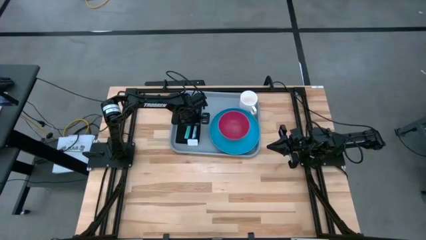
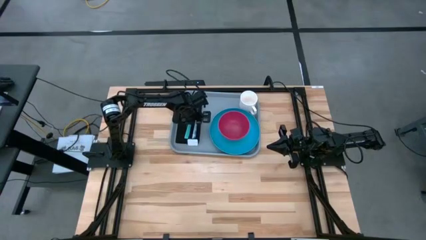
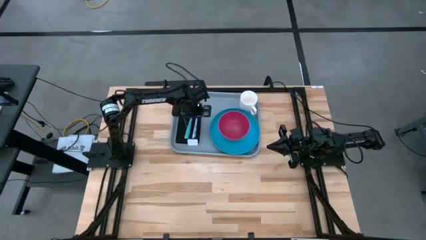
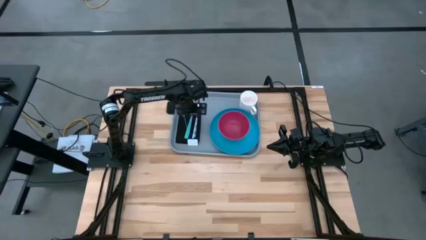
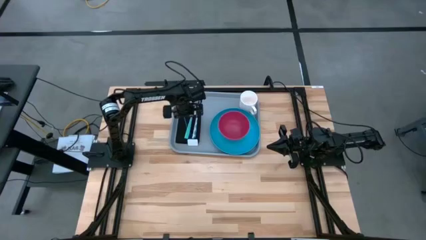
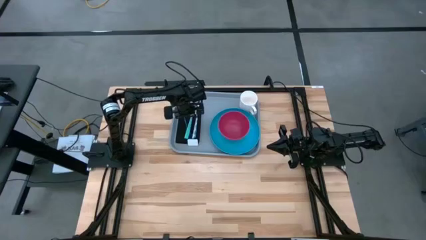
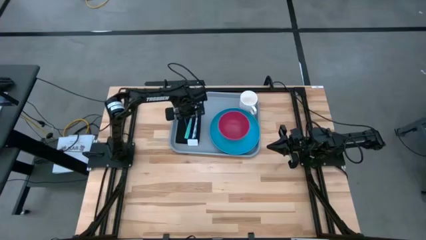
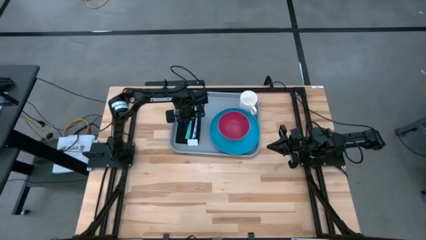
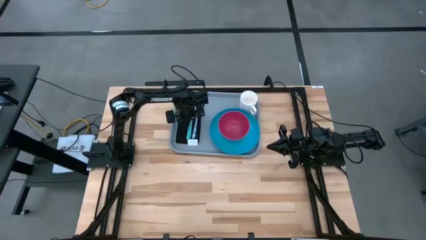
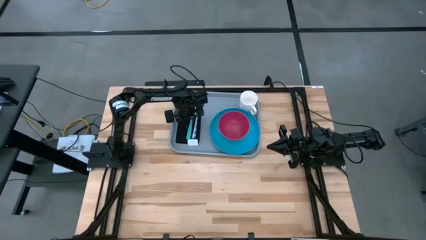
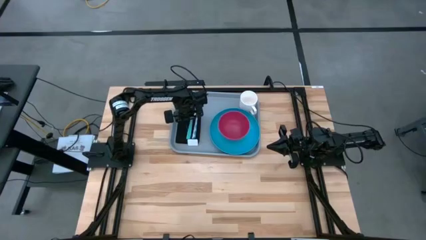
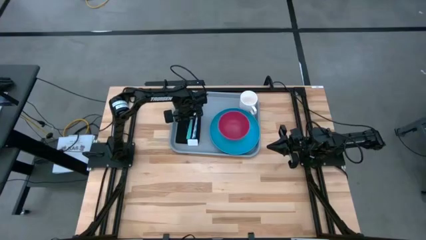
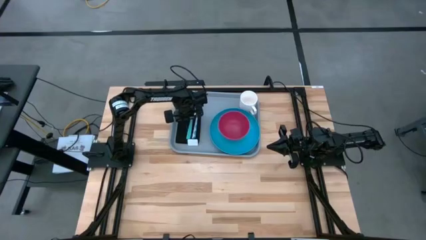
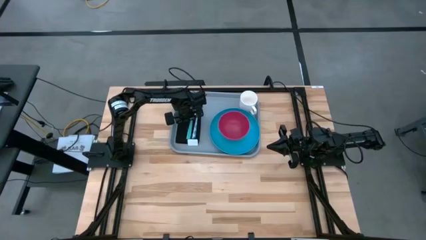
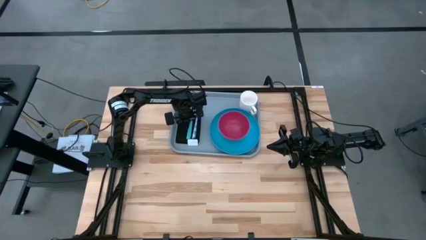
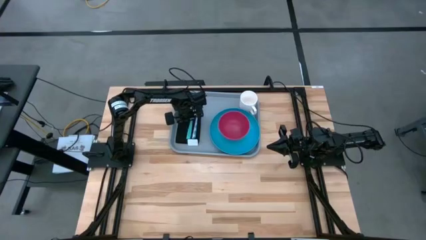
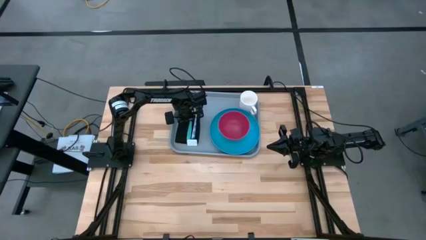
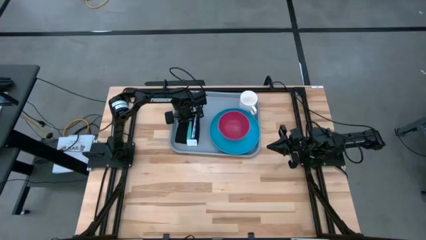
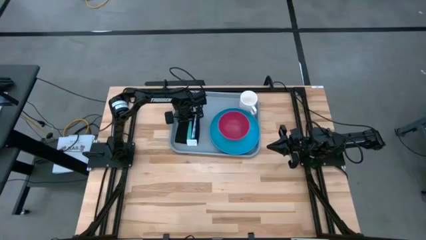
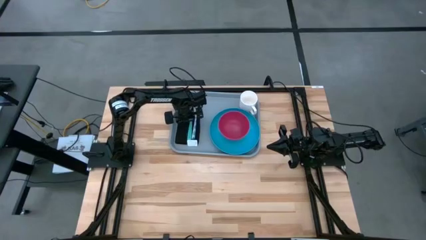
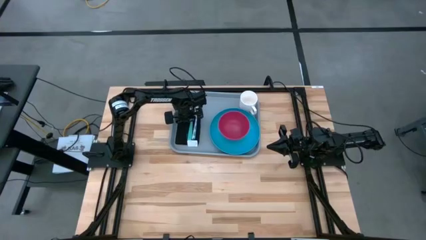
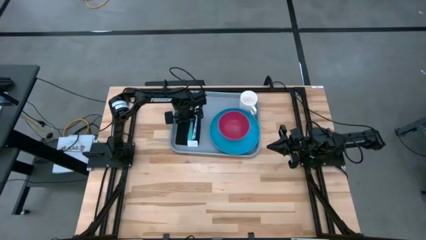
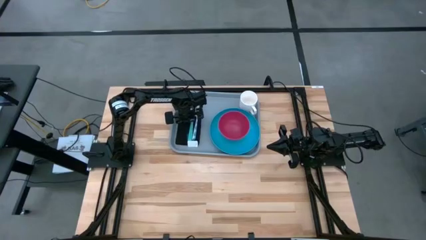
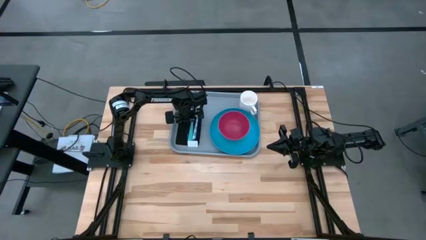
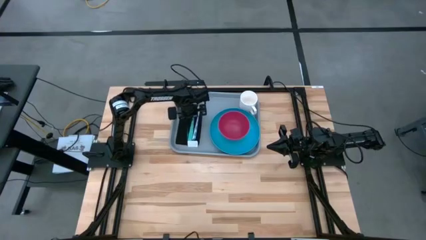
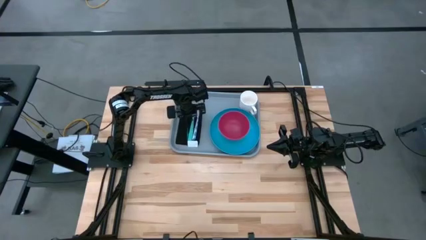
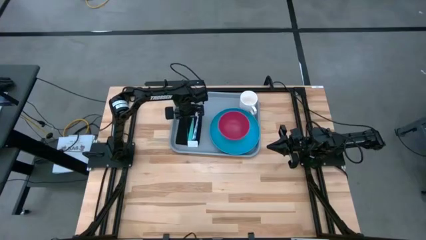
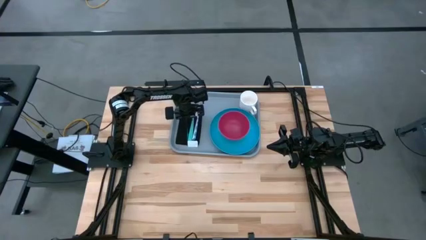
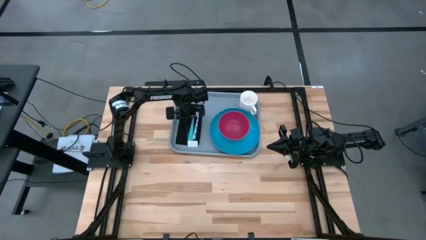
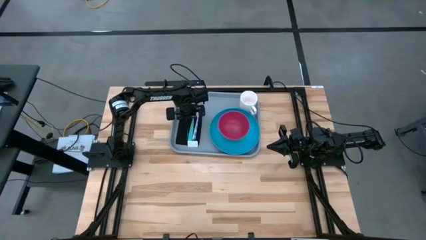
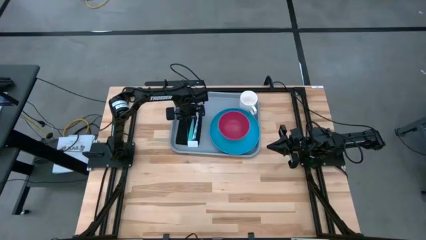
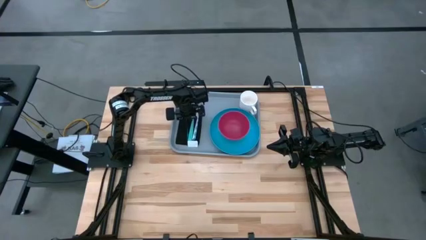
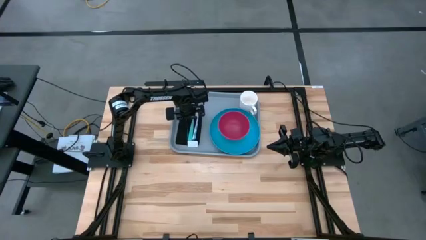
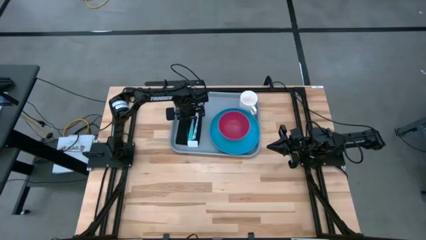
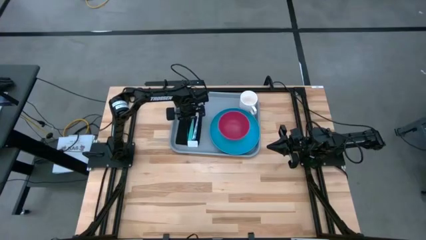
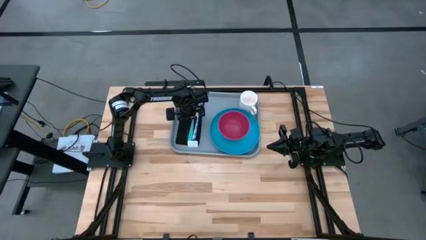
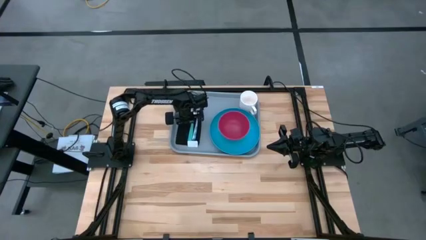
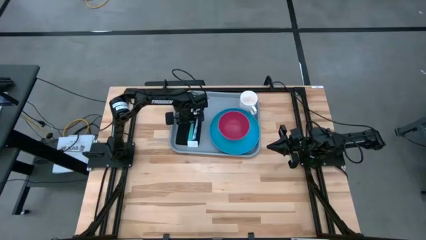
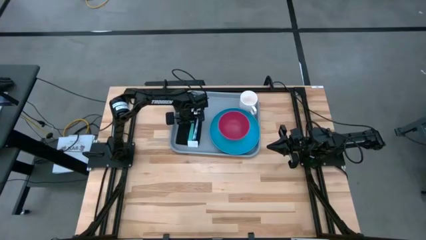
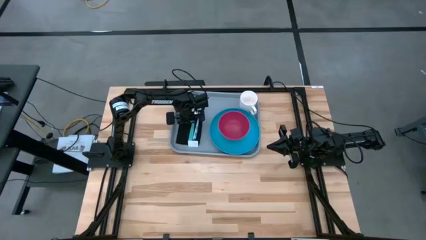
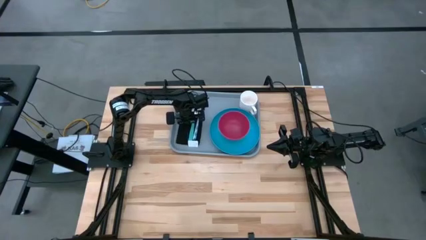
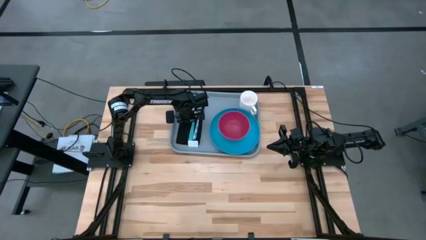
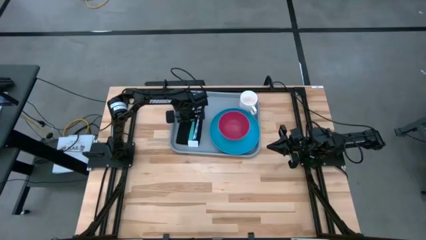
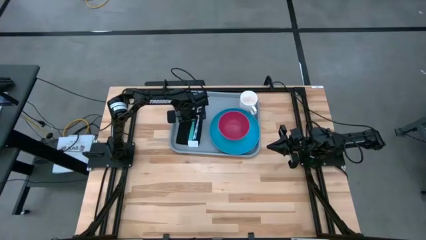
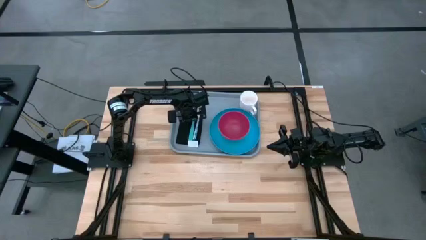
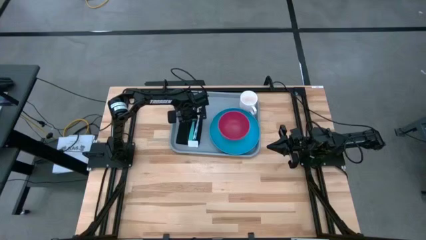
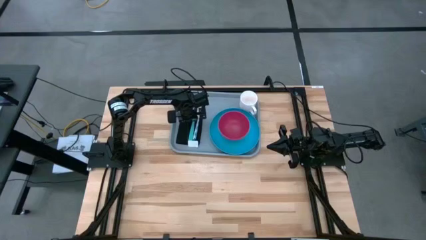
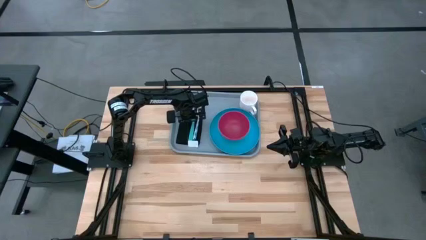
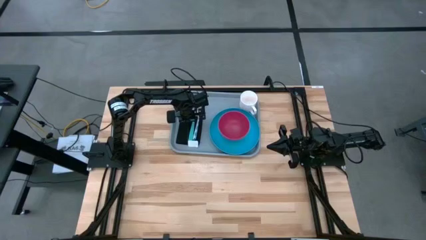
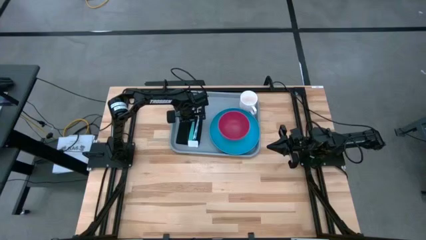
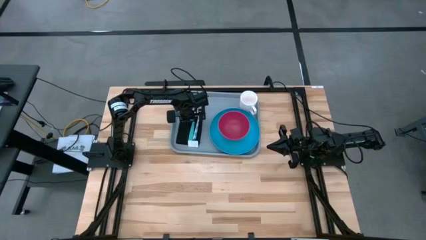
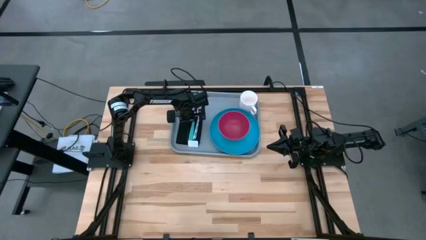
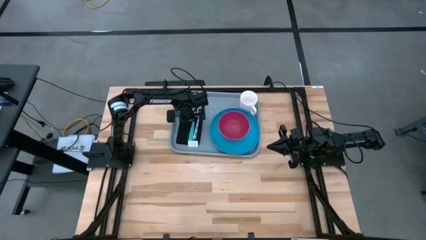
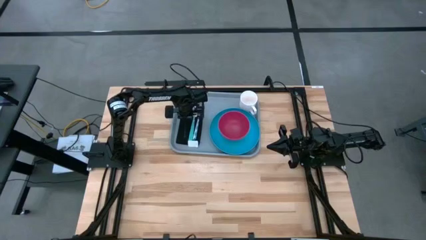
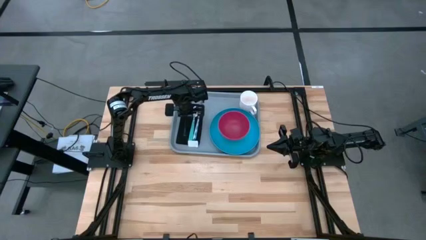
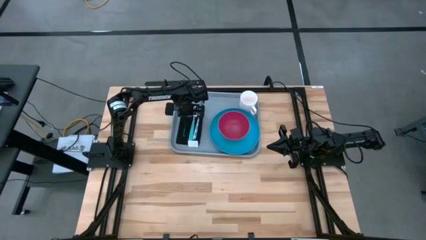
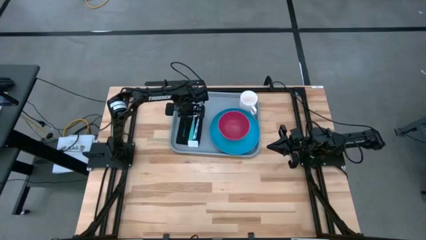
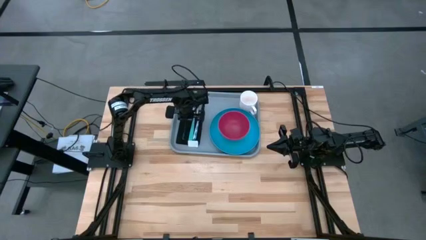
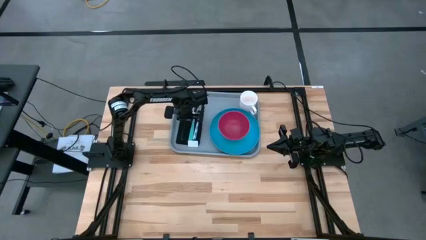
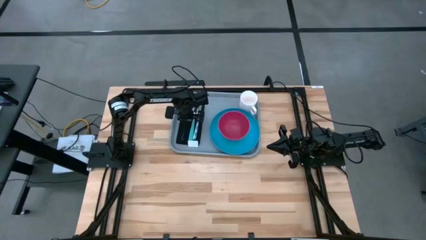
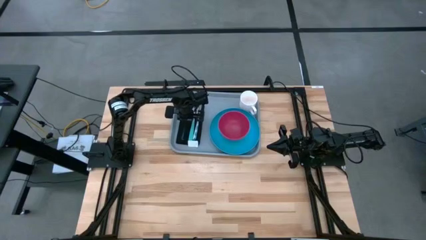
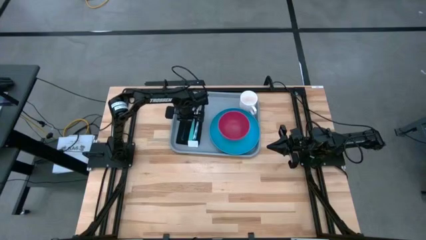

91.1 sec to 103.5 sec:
Task: Set up tray
Adjust the blue fork on top of the black napkin

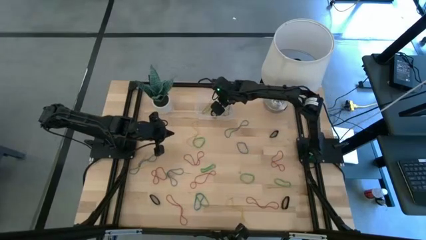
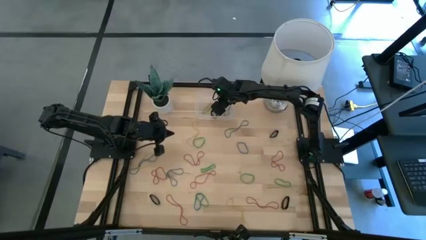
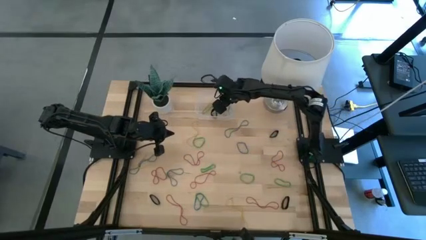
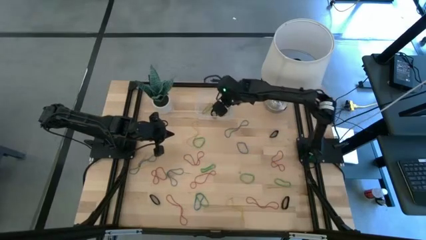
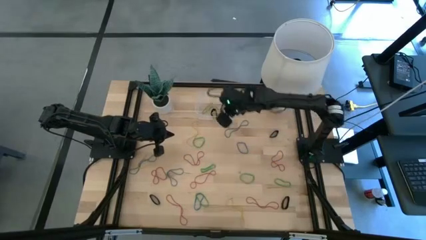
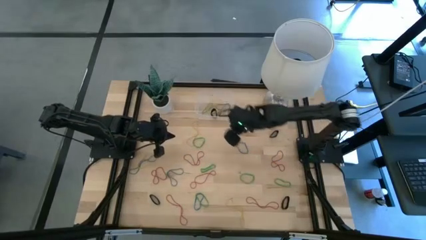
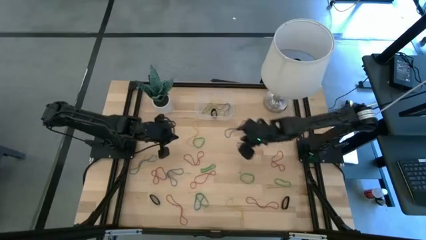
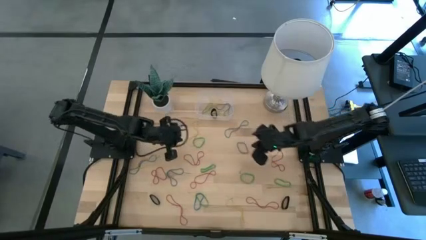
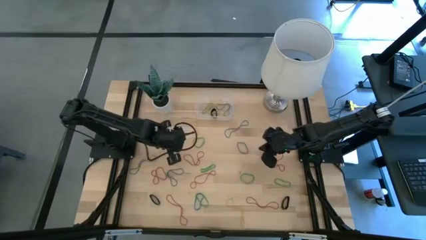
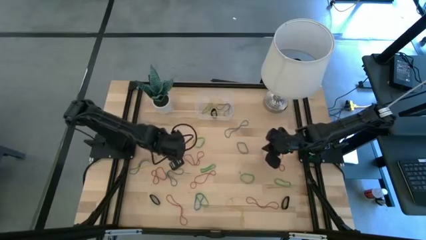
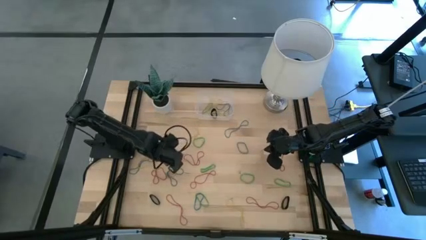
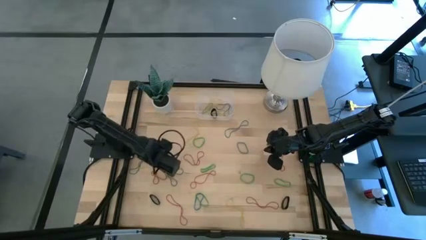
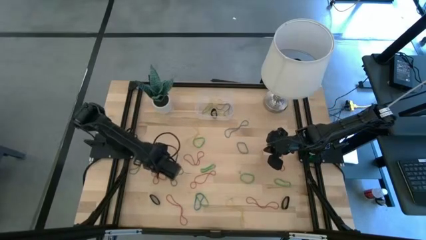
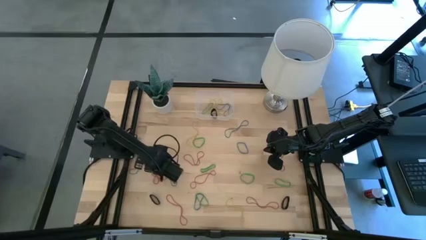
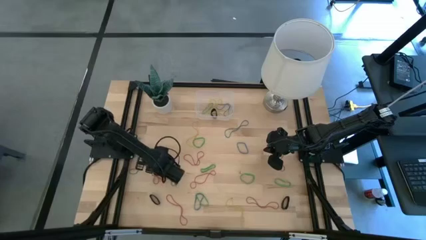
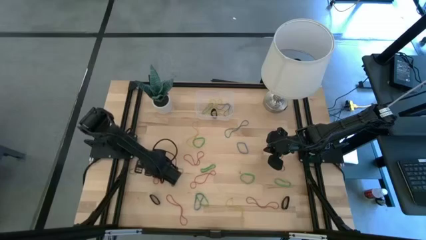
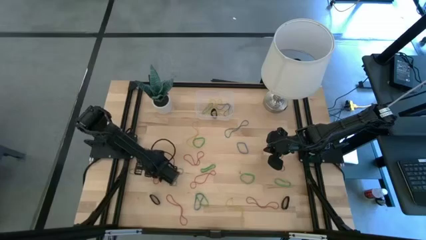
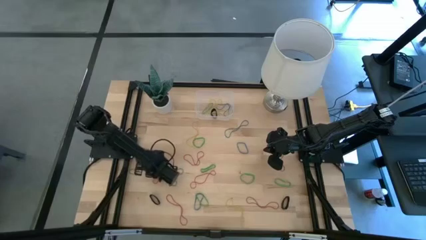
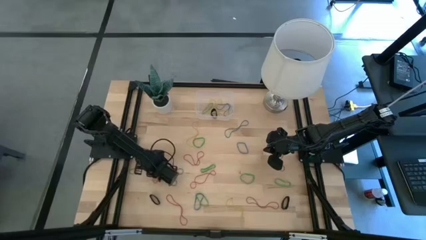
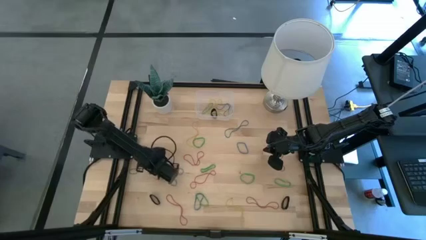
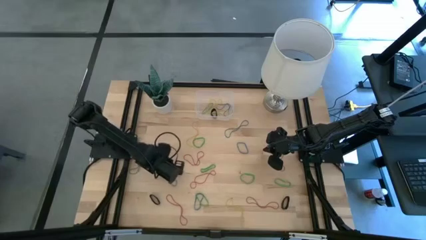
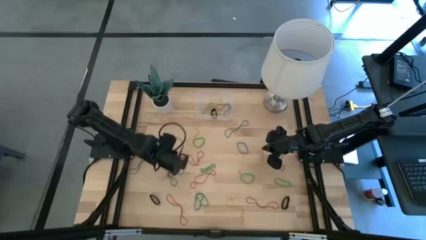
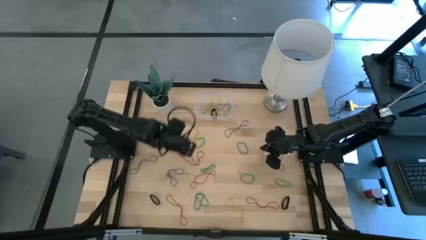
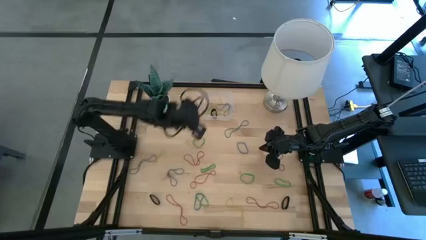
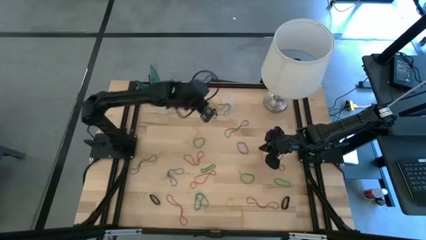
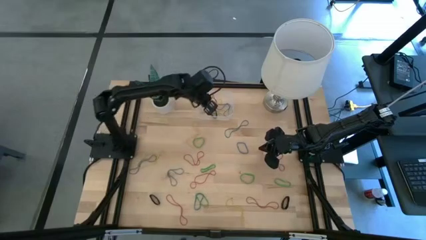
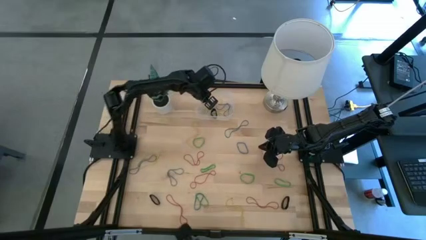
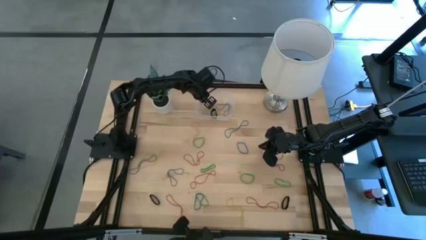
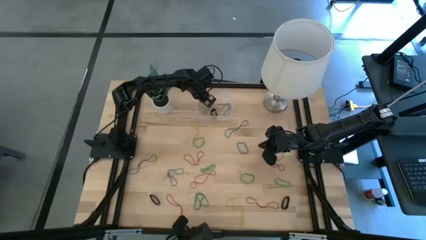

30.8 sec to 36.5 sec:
Task: Pick and place rubber bands into bin
Put the red rubber band into the transparent bin
